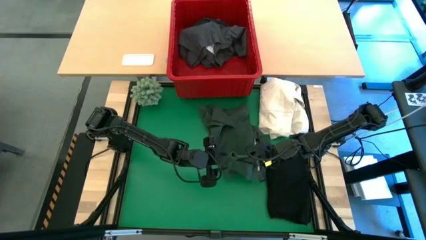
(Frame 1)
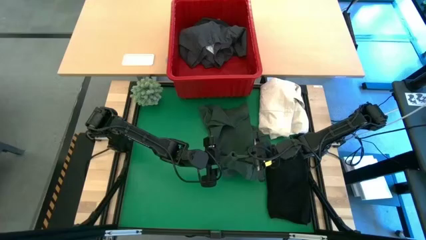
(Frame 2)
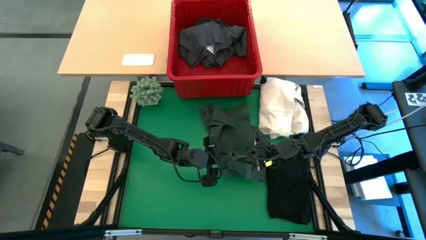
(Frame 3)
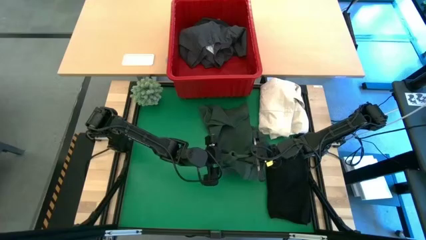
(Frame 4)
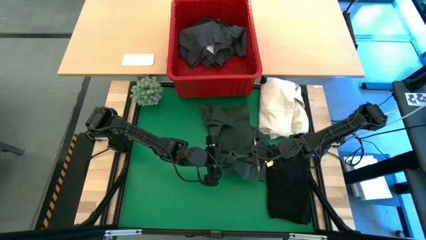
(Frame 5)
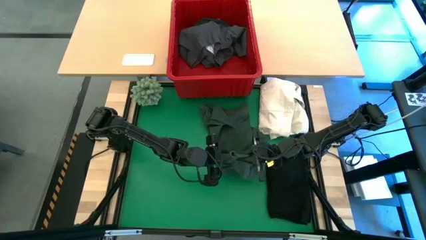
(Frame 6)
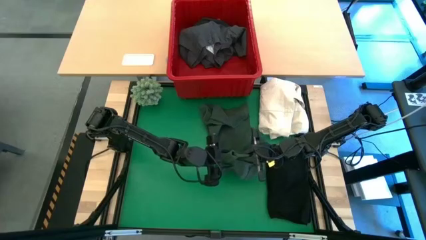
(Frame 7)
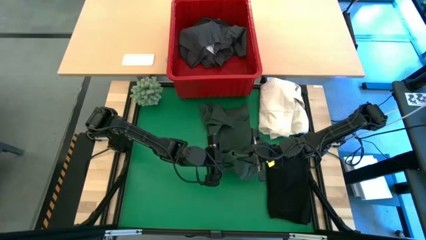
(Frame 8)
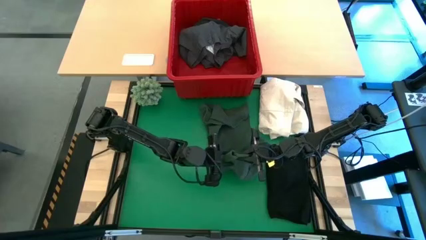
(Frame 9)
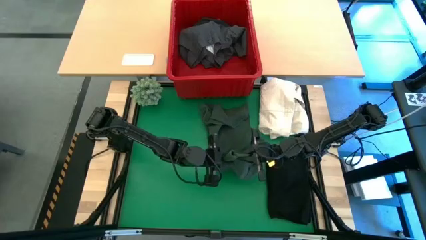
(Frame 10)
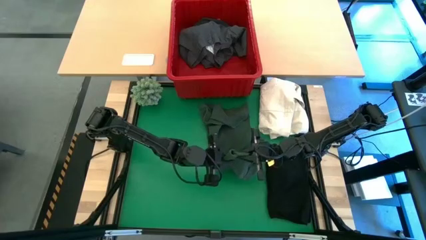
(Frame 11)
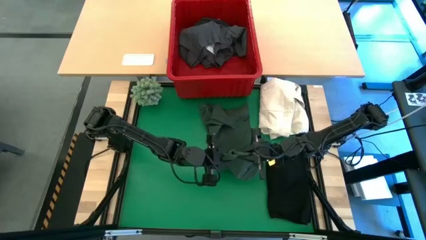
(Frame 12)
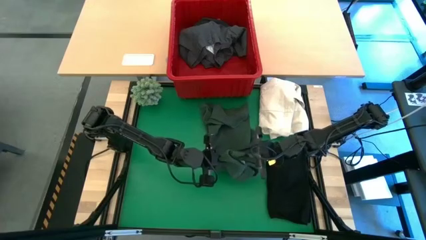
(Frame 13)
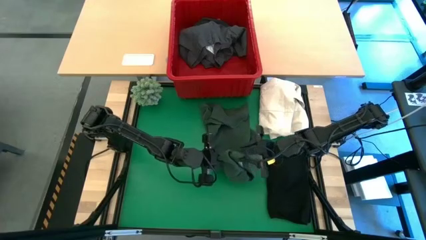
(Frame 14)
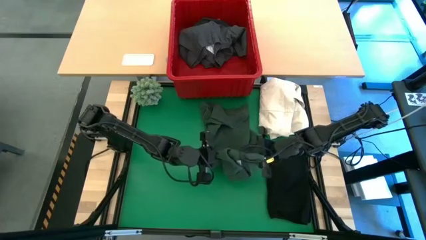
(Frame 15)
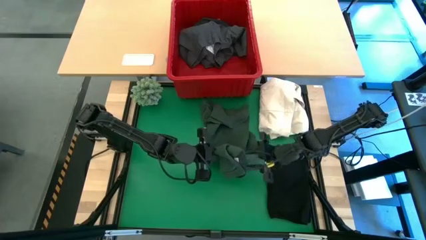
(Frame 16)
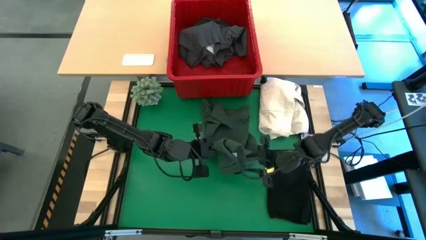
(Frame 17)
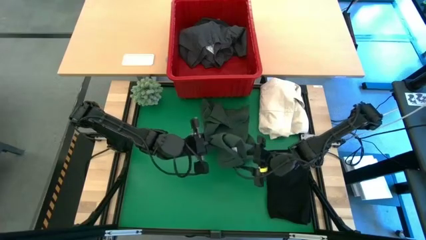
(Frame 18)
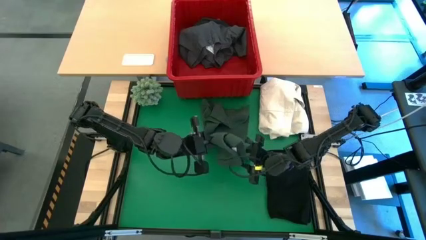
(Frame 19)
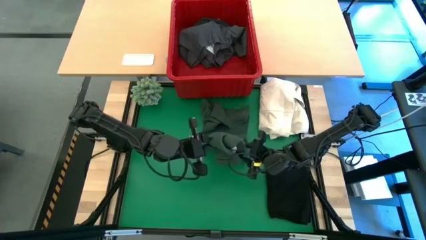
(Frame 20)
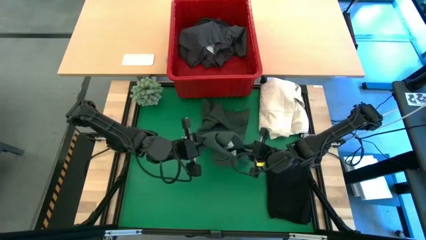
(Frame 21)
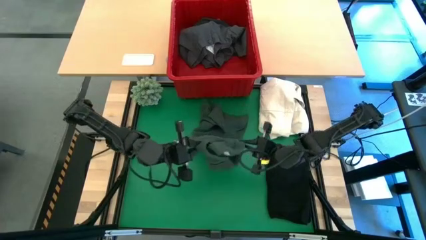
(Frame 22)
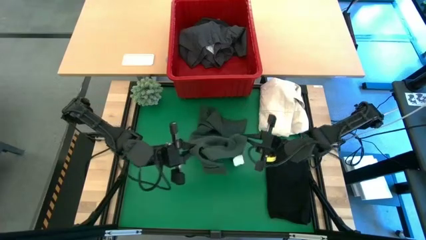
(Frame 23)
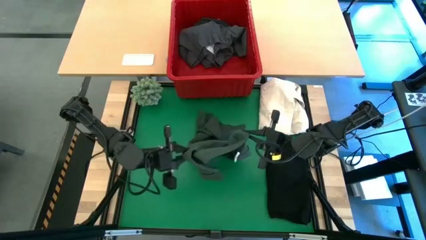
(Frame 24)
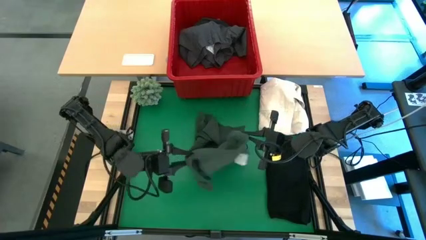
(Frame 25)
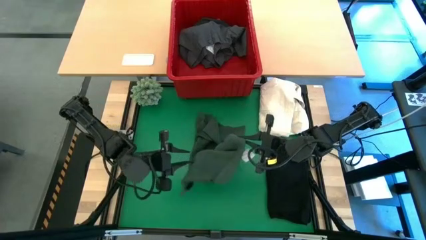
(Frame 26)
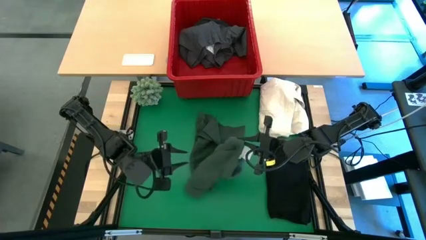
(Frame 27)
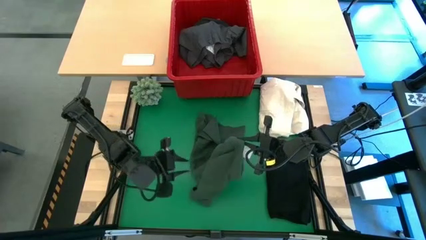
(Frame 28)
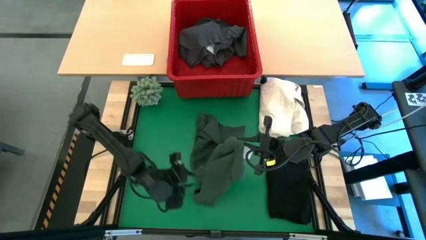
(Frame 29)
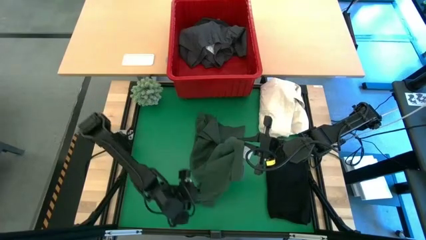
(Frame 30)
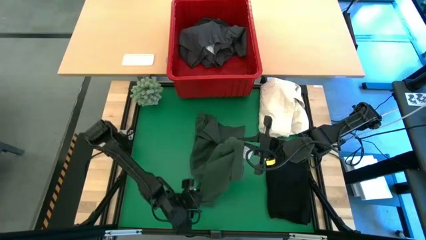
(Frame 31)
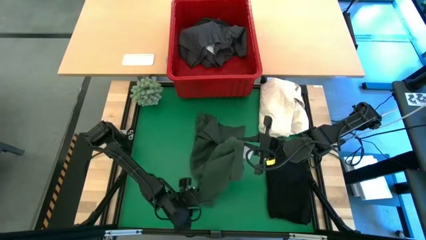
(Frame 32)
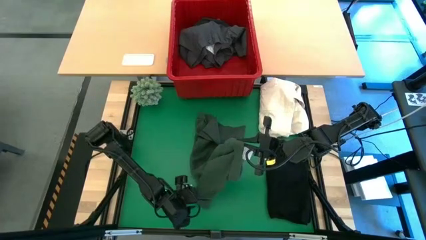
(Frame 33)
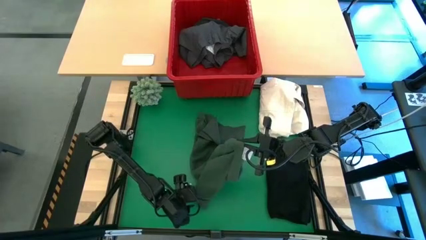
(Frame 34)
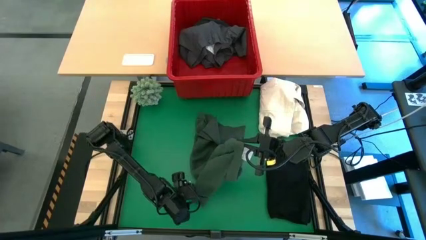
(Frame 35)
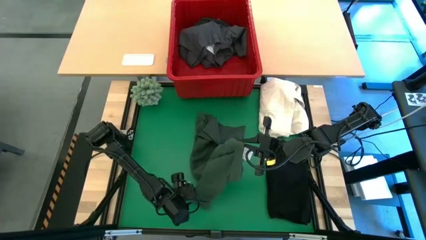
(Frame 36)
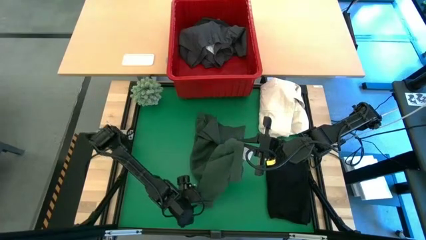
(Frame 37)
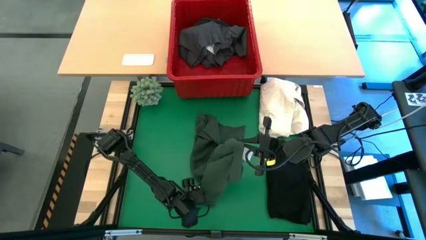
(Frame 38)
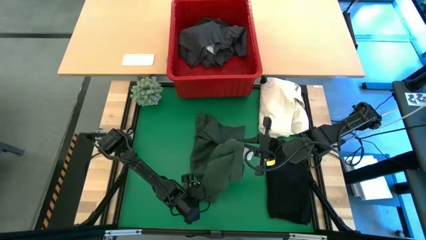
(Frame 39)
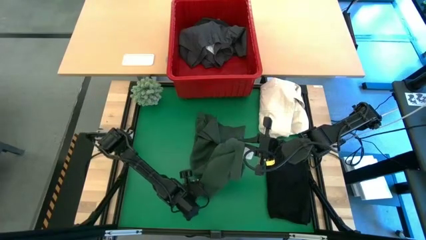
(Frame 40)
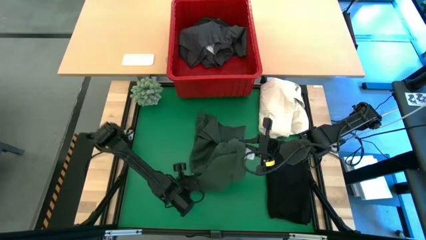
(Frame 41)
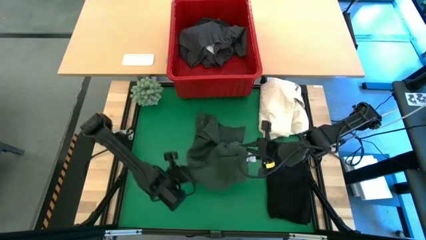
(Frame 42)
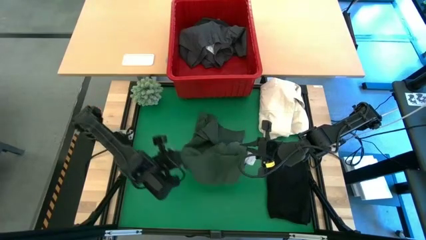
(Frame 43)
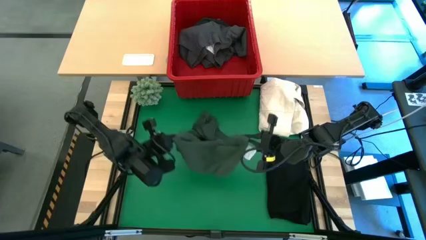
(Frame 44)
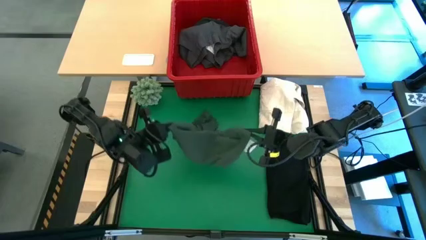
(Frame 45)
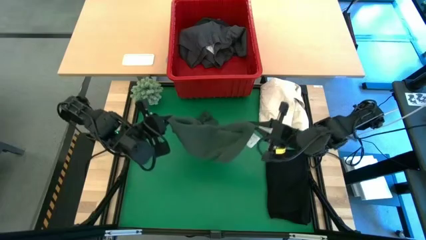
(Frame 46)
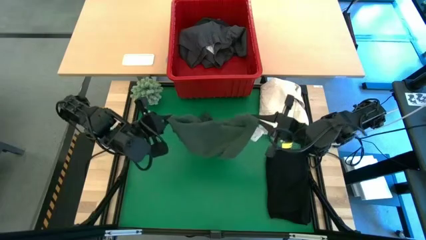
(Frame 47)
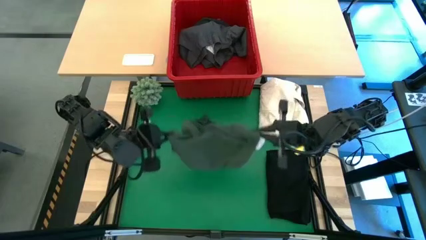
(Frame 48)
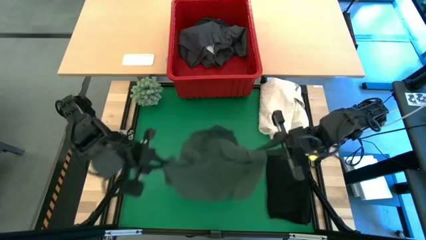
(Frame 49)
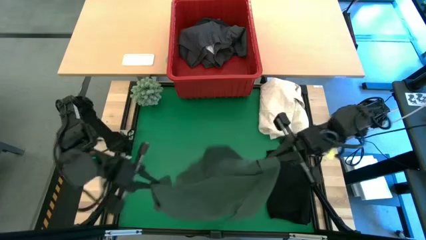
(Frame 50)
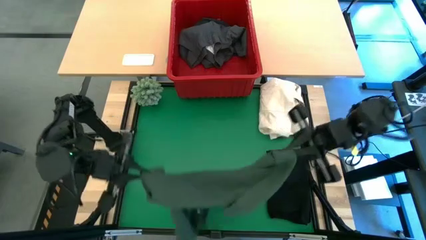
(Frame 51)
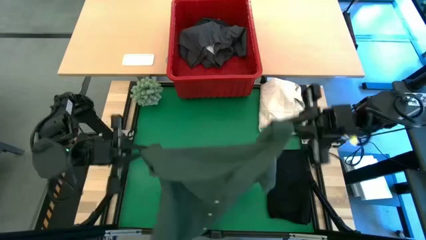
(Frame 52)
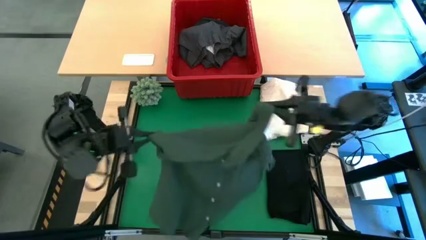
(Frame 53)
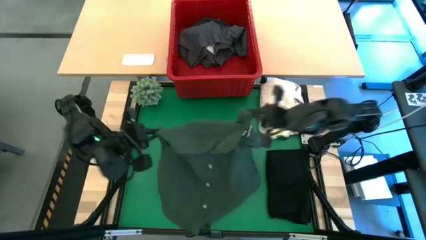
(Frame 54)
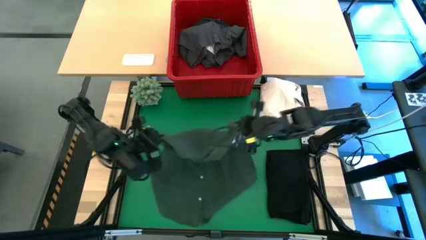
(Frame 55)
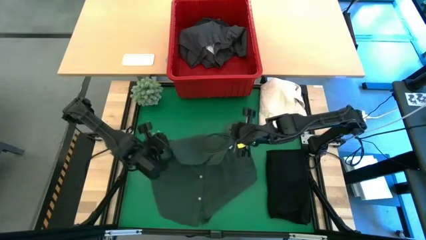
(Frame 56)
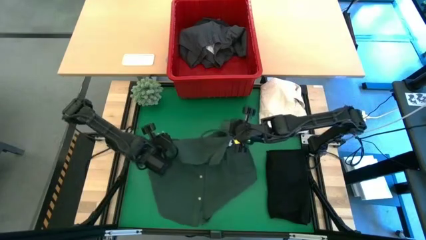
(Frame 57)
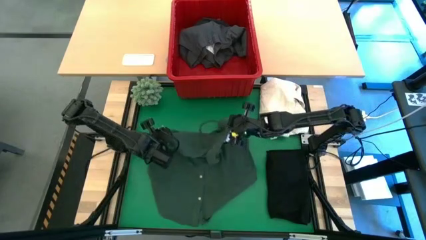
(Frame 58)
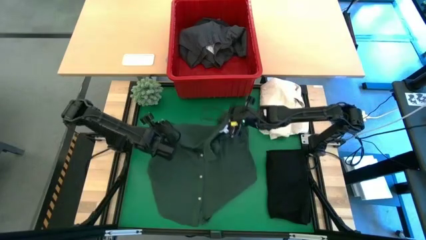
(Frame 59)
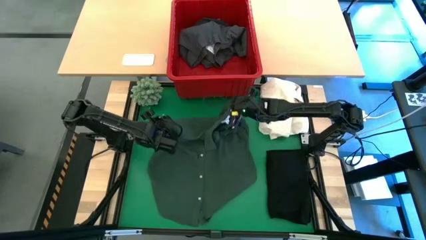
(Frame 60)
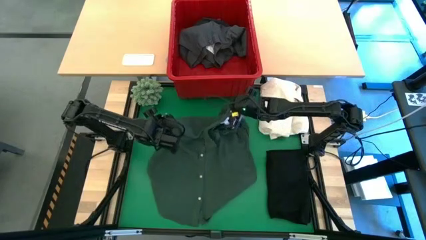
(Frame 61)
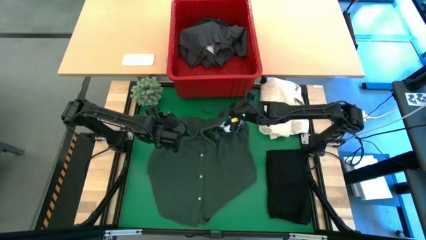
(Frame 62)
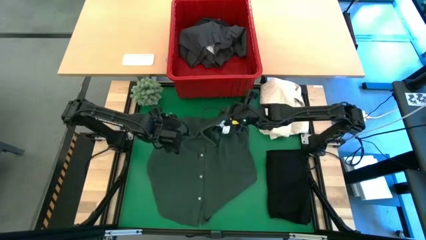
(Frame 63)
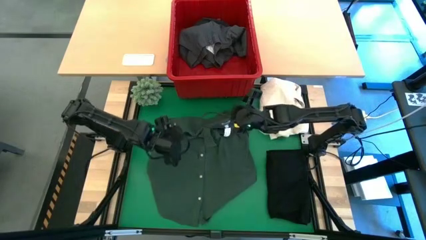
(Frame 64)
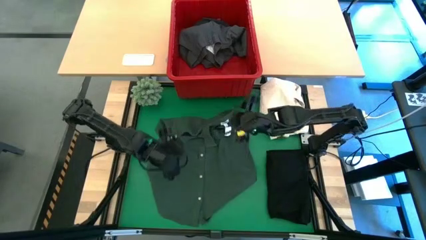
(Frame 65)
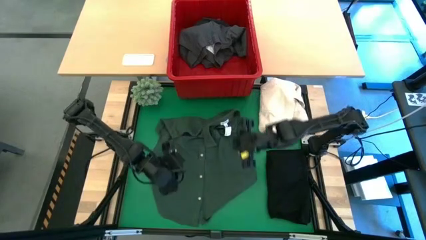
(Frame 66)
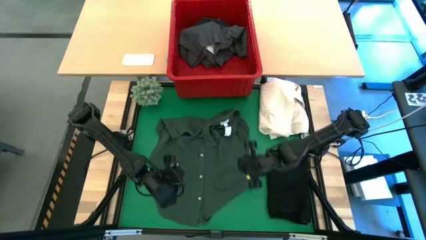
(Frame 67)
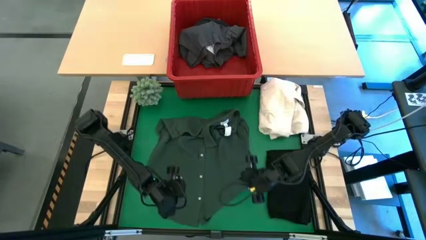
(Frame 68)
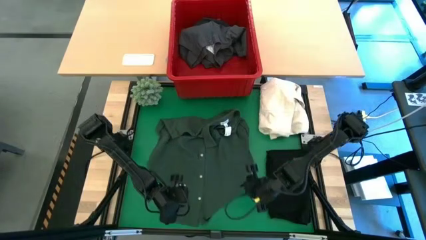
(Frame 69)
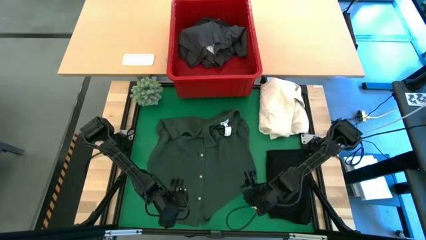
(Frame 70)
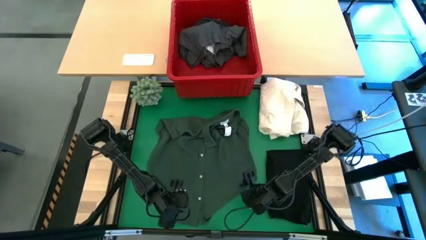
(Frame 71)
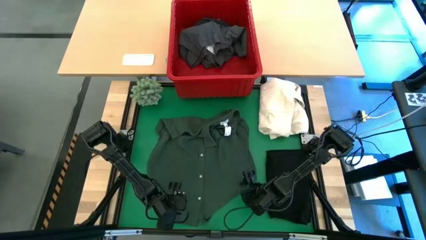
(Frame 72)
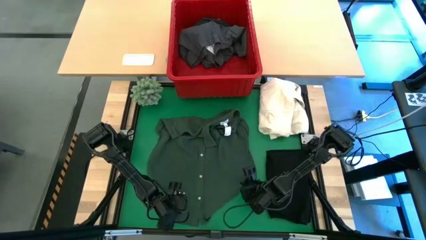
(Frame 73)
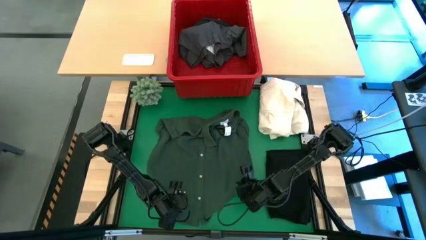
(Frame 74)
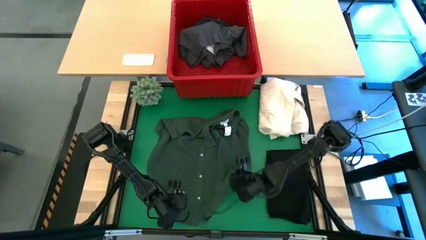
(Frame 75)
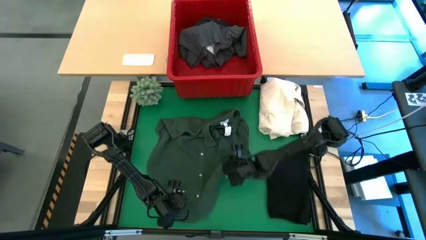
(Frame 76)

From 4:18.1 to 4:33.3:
Task: Fold laundry
Fold the green polo shirt

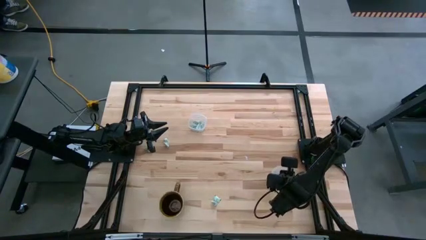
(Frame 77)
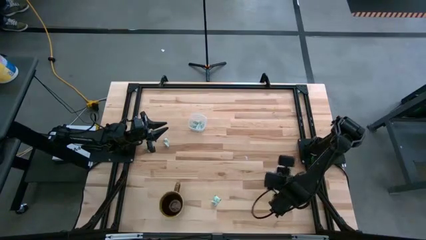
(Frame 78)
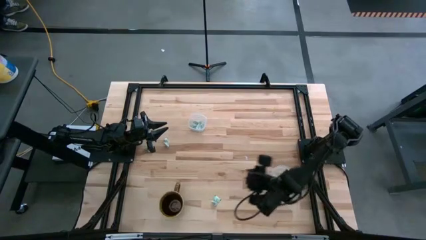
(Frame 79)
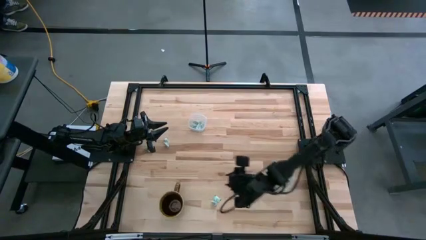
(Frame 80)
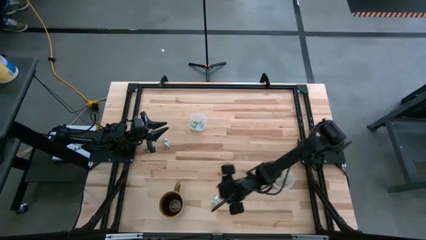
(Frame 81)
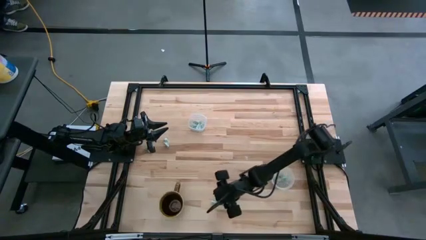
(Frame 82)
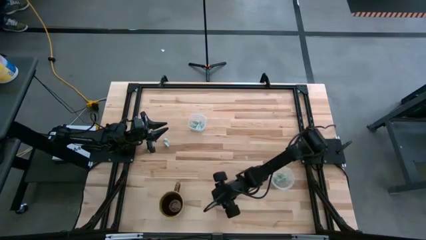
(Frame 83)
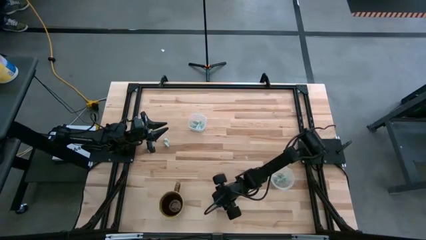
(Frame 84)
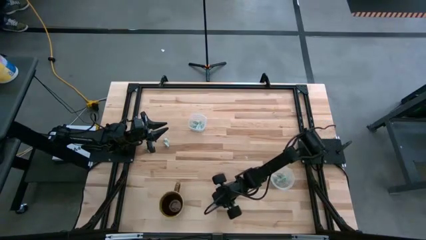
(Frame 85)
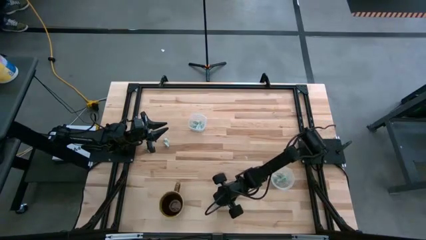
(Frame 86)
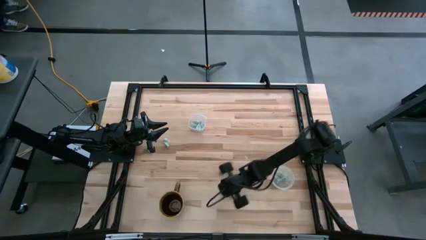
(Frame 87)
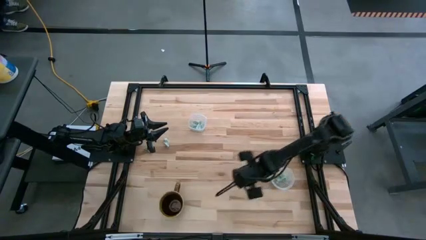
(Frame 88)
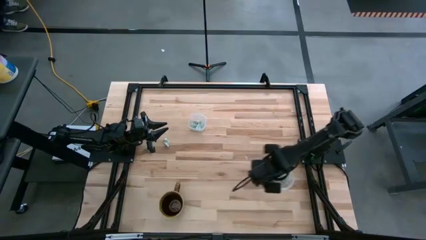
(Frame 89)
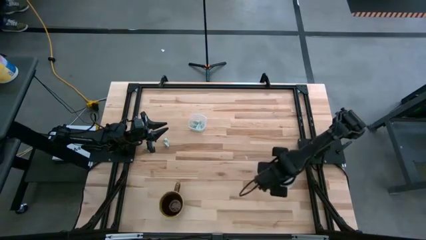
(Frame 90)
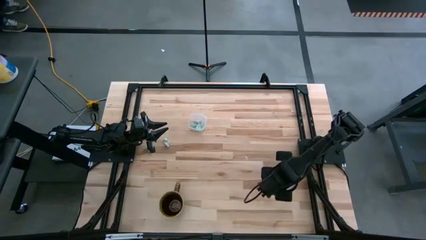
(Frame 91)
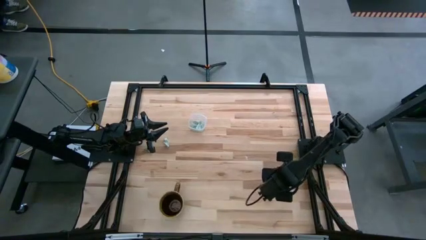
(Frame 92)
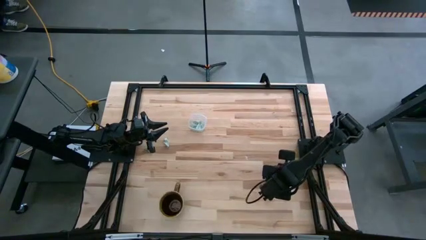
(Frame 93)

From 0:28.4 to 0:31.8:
Task: Pick and place items into bin
Put the white stevia packet into the bottom transparent bin
